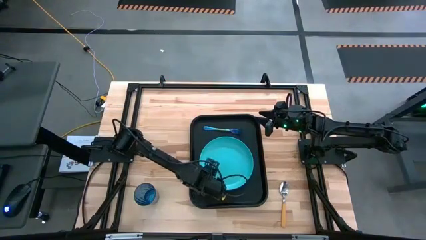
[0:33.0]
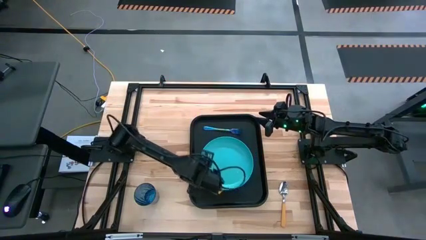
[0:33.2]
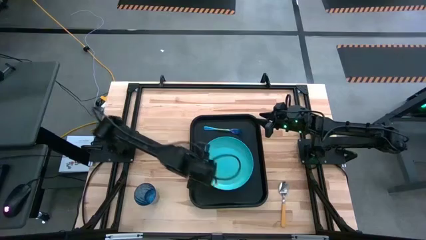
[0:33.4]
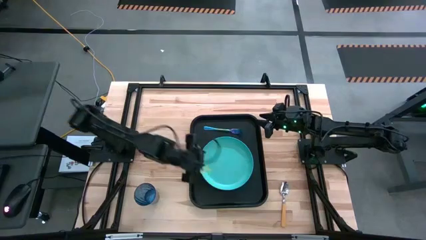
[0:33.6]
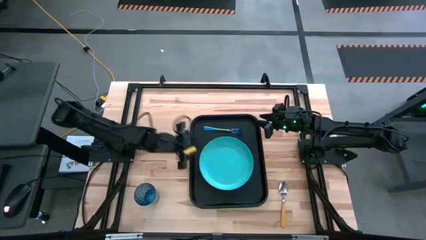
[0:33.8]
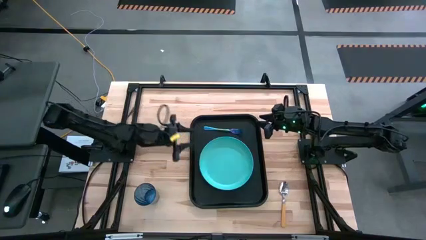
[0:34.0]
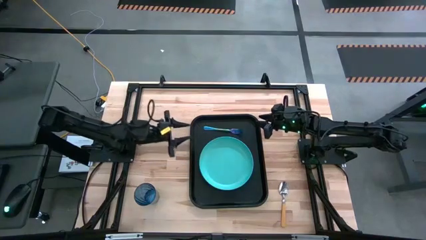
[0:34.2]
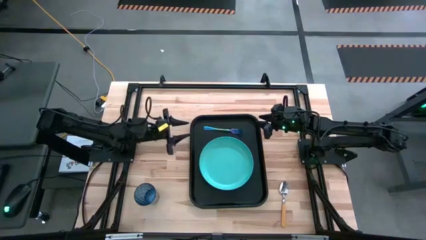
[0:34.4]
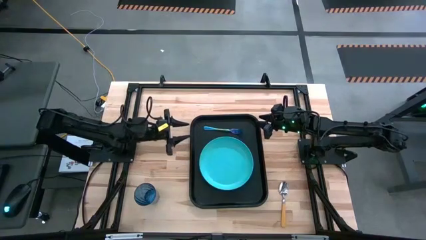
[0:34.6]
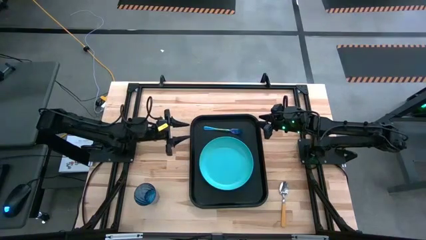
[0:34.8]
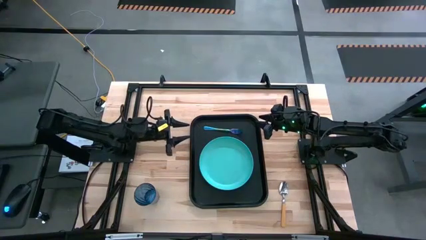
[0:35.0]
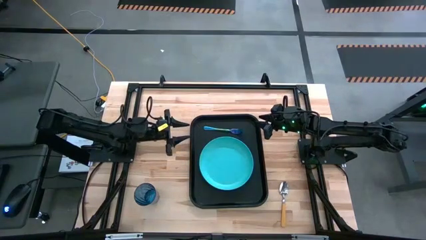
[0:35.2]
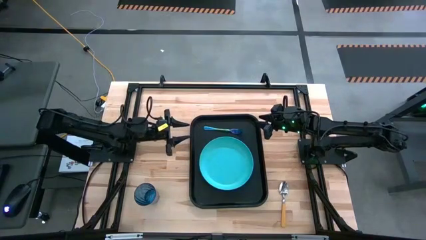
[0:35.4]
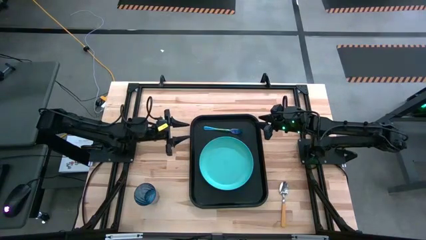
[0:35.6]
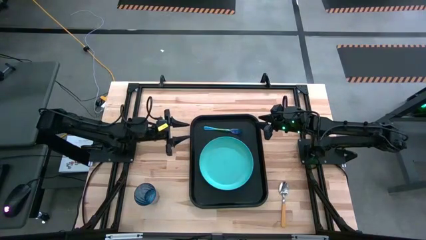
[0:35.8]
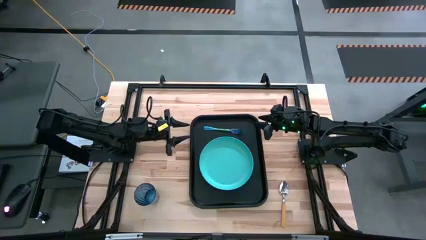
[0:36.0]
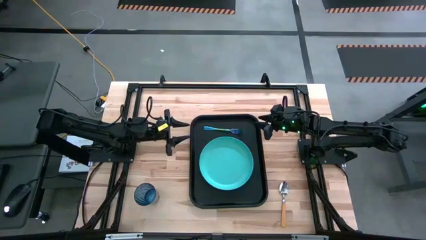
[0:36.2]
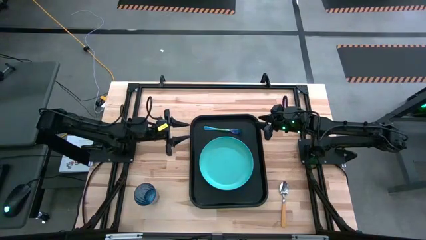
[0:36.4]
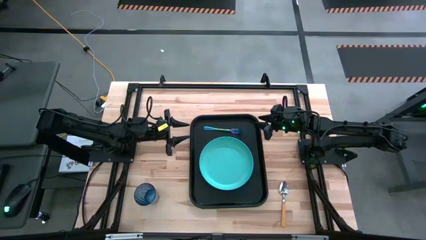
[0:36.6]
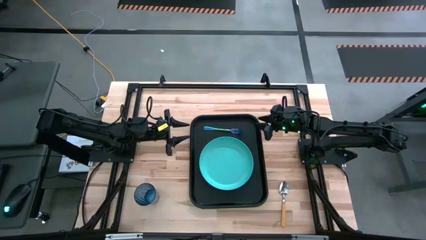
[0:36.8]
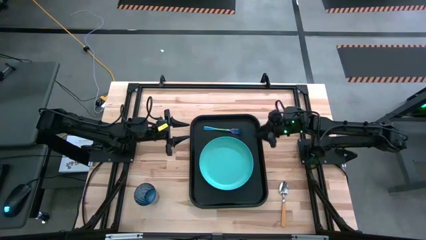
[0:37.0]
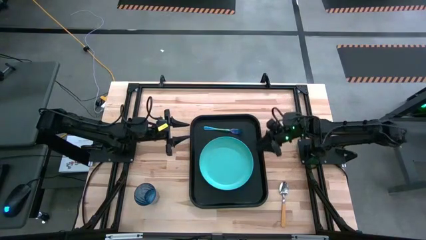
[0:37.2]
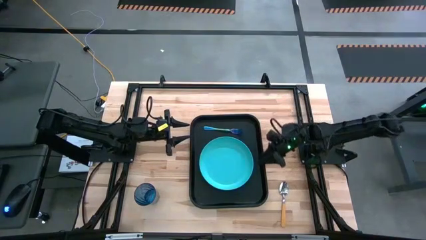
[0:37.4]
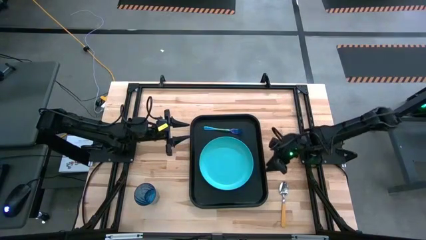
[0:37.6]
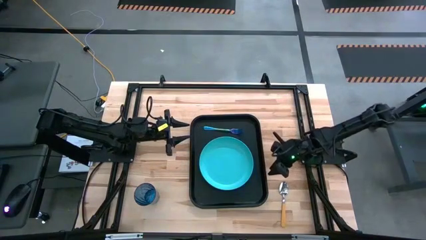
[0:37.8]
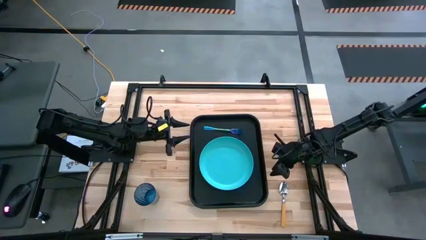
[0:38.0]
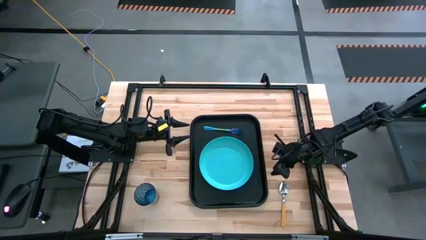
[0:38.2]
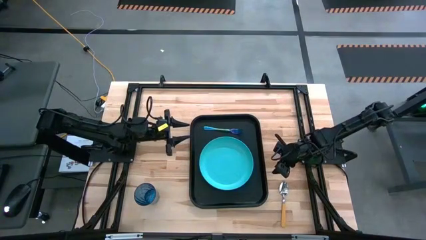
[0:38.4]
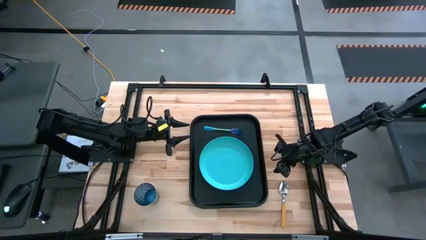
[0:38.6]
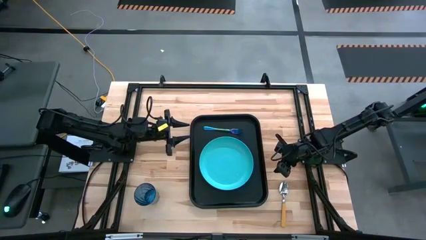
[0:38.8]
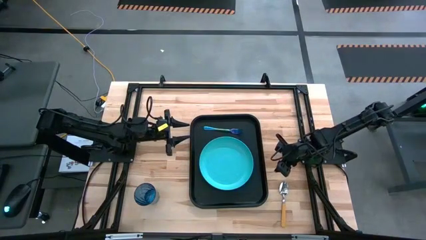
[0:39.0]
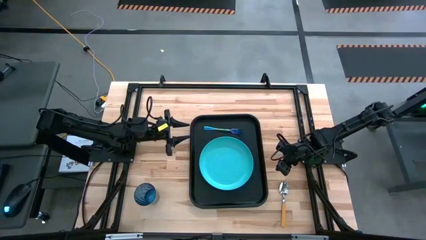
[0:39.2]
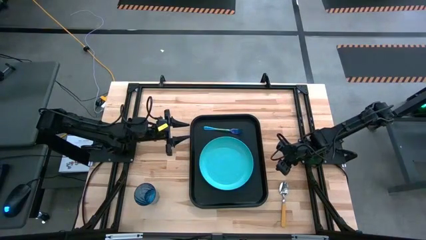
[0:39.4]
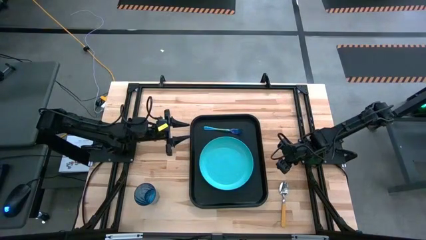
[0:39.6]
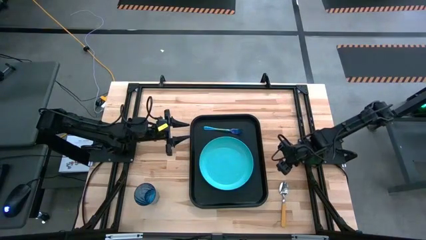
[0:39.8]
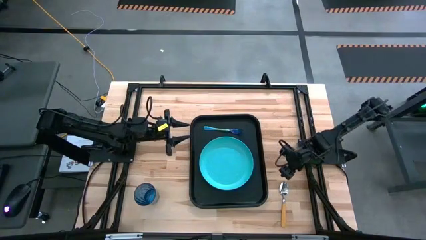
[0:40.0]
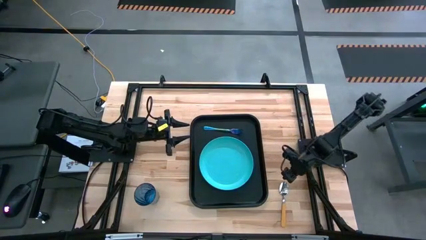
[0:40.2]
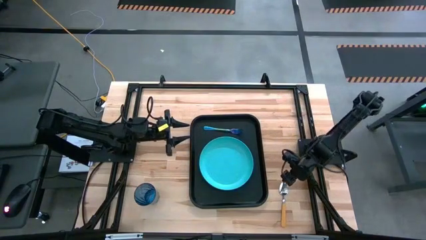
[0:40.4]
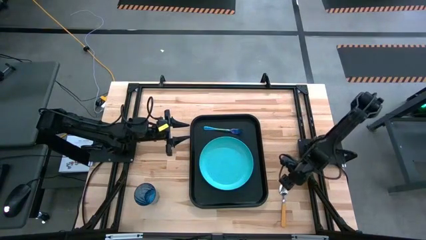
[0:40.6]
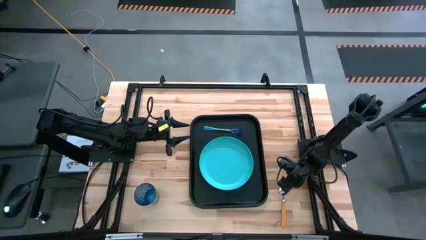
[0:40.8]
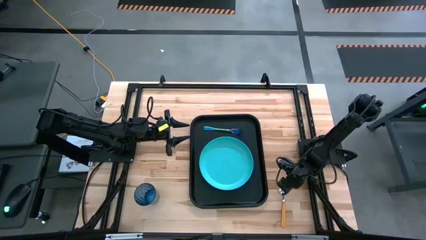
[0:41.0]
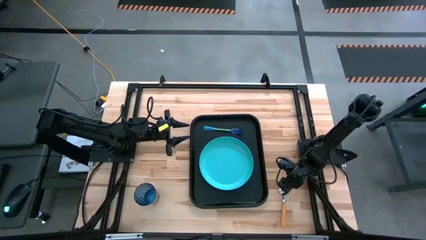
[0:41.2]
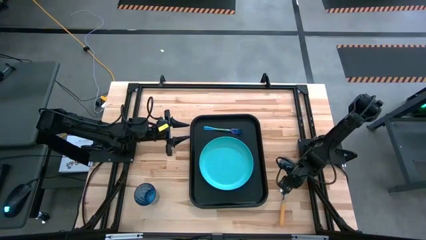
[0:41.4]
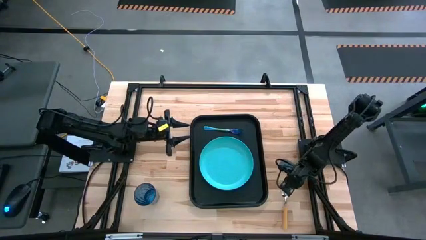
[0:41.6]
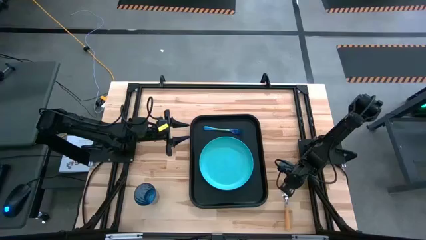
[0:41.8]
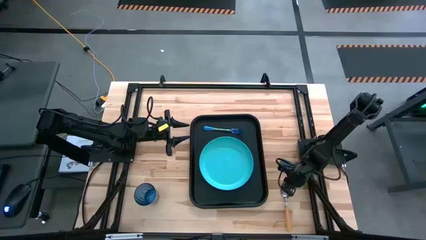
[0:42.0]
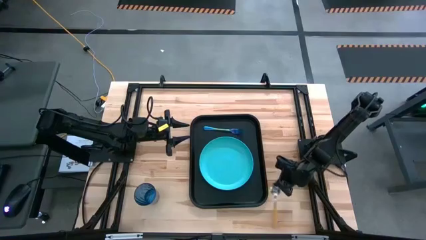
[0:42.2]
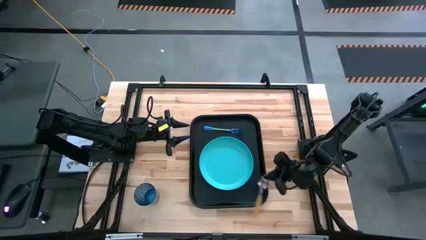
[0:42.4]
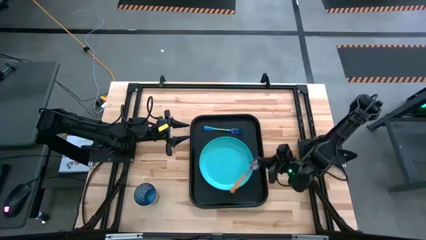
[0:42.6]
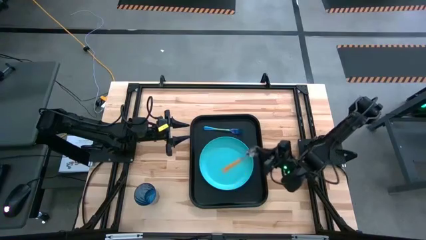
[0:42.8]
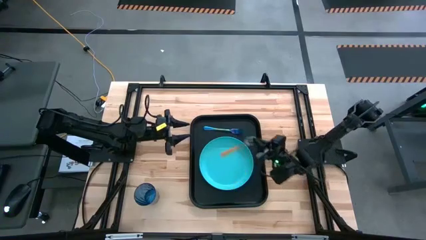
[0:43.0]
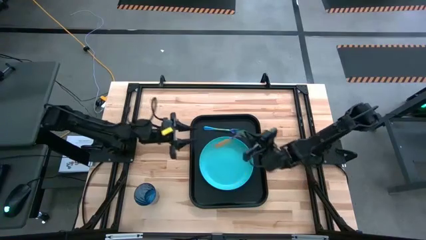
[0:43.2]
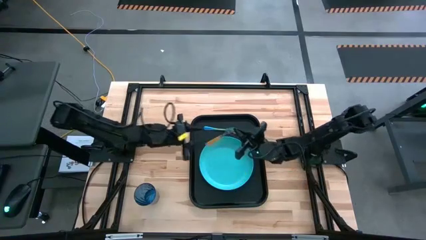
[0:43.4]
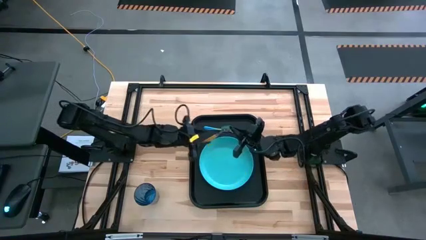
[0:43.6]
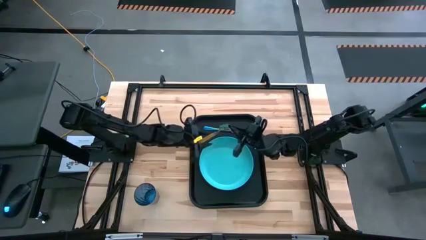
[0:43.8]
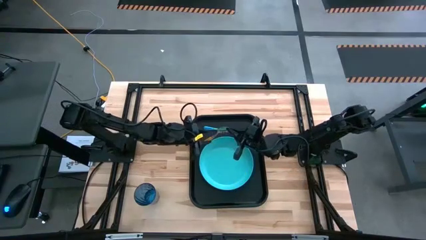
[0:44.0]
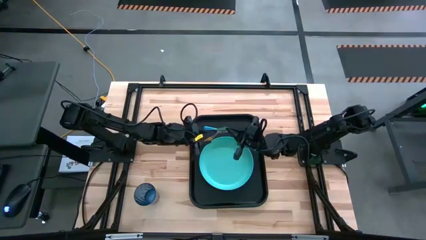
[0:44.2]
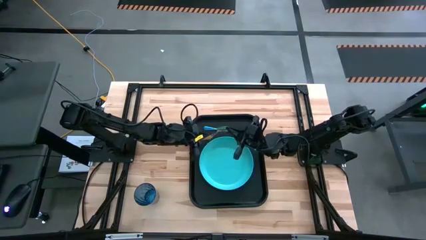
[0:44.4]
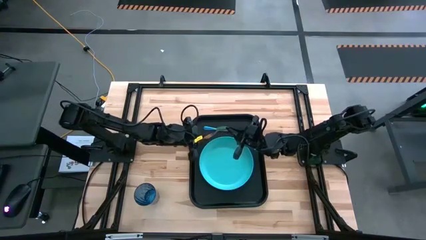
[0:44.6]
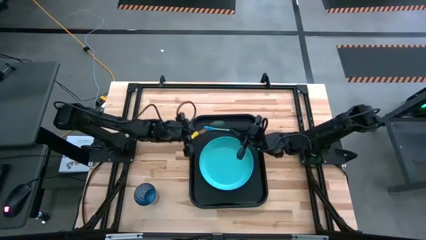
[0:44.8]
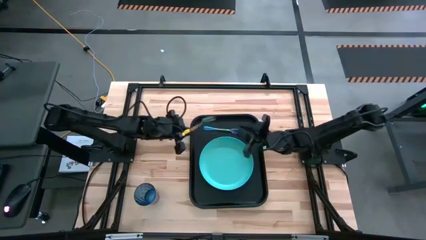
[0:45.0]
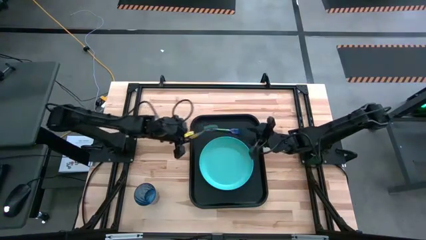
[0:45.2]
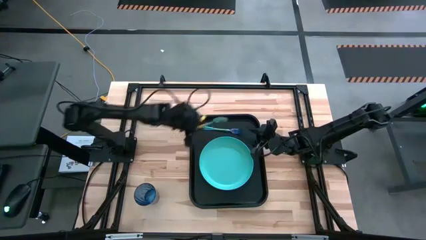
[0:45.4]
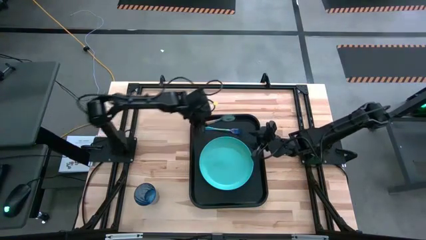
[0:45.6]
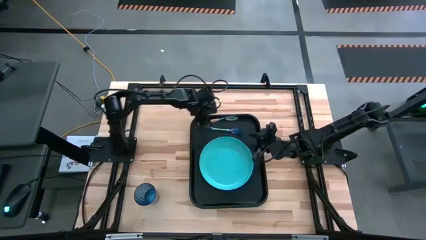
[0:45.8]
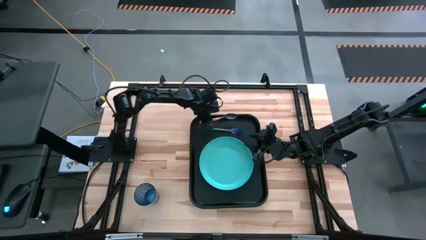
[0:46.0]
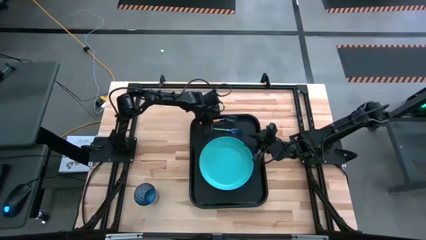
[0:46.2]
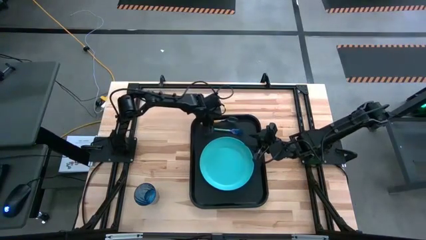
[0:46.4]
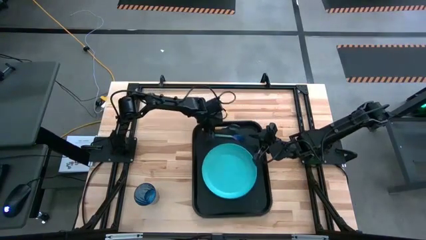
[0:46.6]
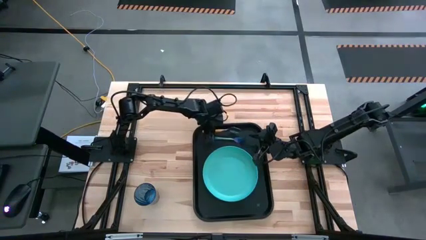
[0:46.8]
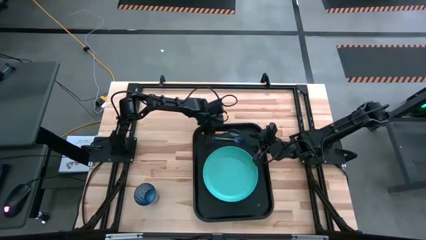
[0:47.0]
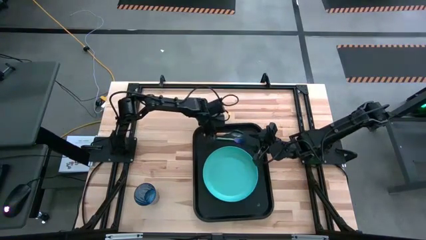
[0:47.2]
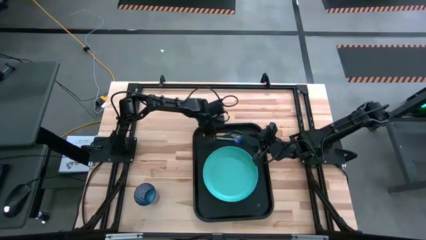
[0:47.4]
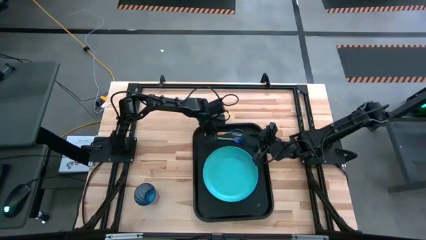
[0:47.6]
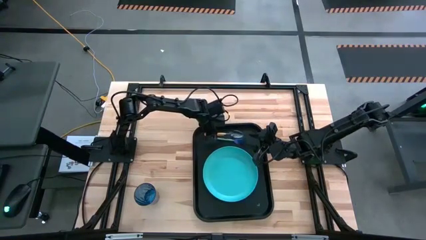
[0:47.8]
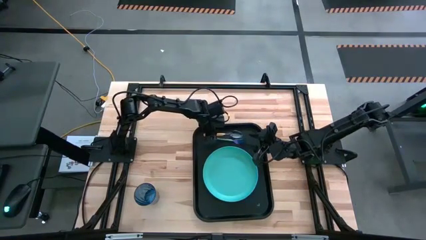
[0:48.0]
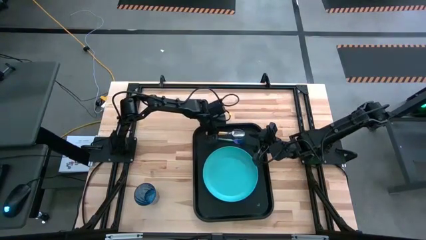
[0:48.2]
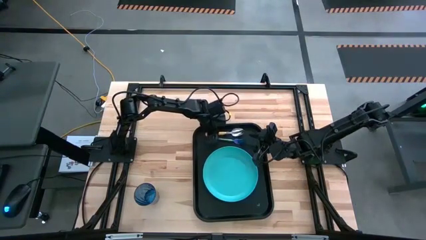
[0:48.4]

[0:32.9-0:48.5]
Task: Pick and place plate/cup/fork/spoon on tray
Put the yellow spoon to the left of the blue fork on the black tray
